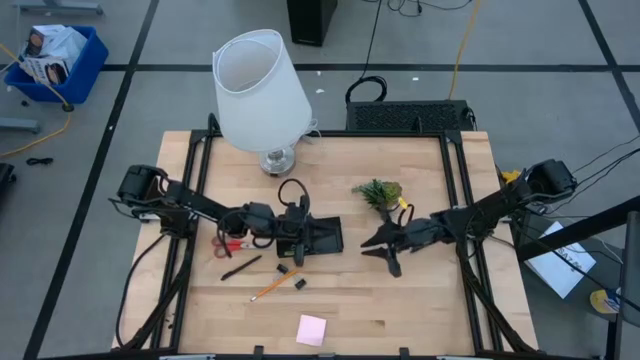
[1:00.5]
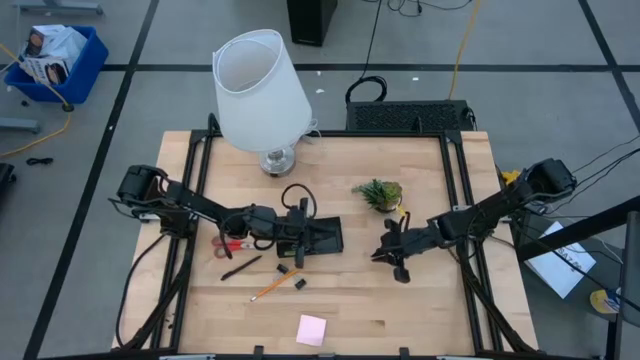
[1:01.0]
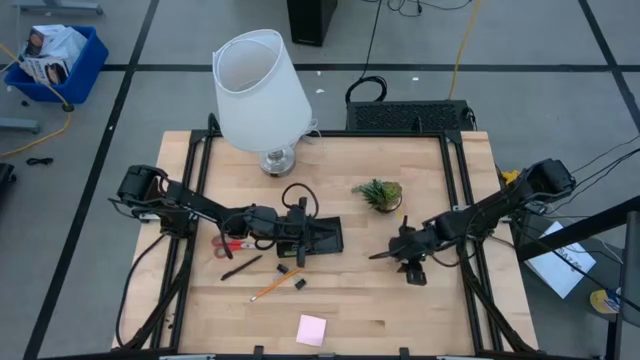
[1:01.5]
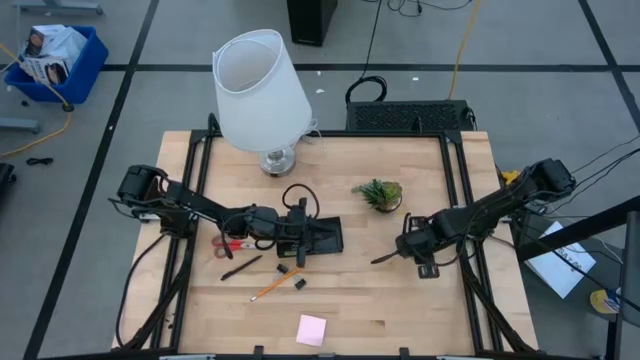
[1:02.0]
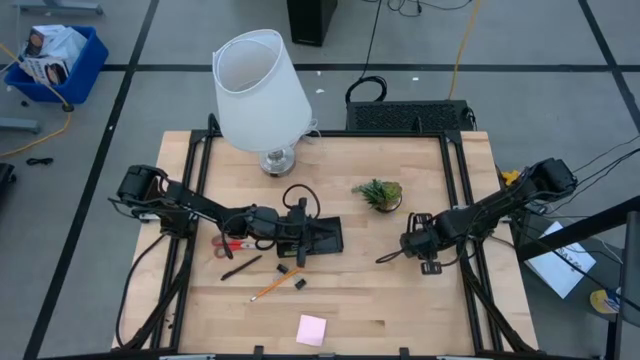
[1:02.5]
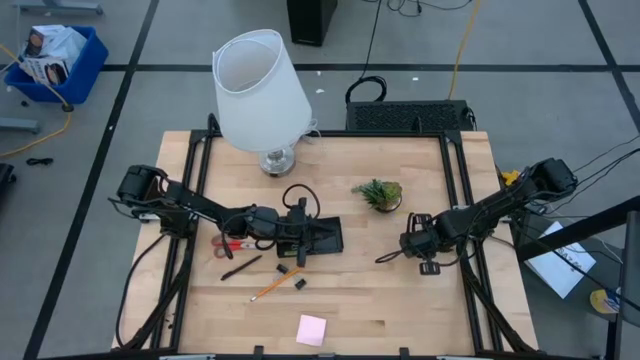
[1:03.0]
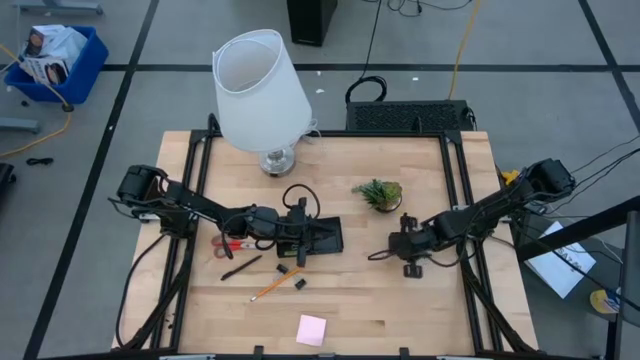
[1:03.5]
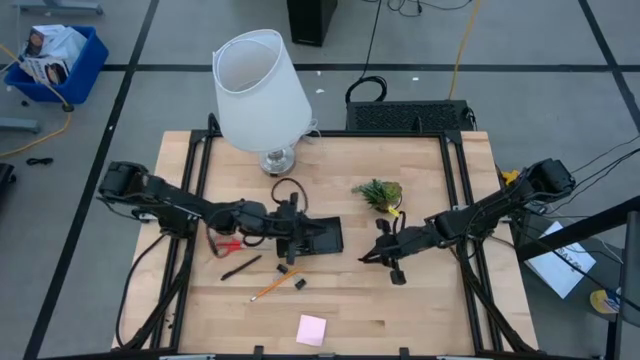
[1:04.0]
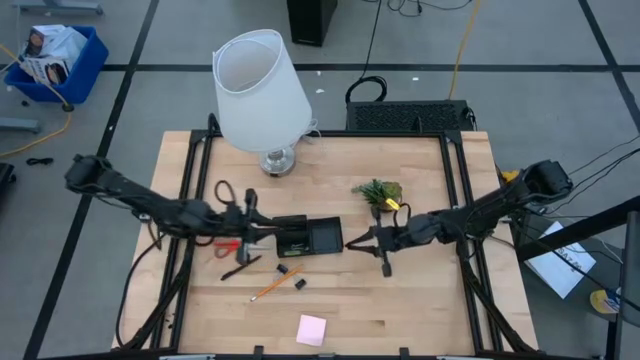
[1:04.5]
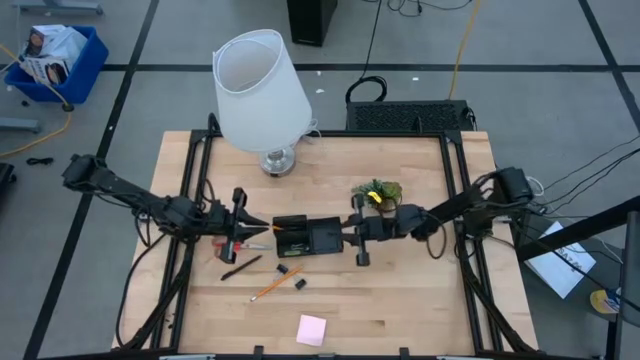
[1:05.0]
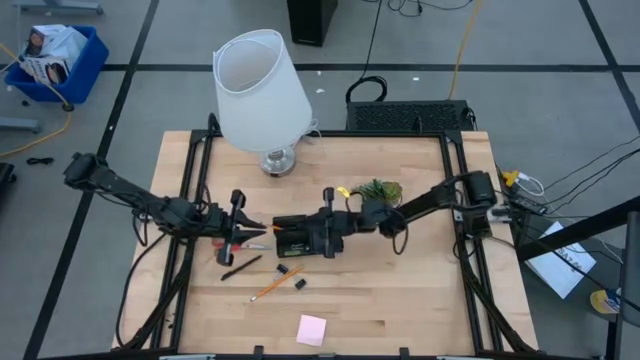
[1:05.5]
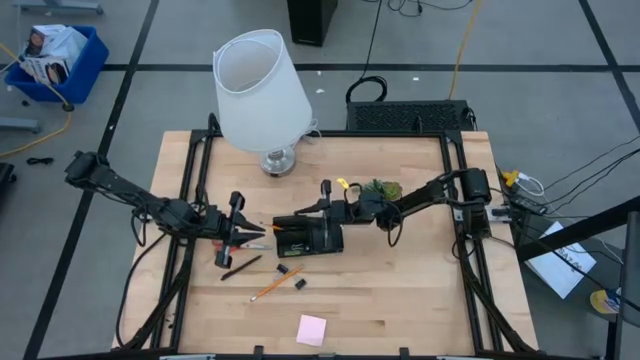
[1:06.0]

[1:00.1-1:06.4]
Task: Pick and place office supplies into organizer
Put the right black pen into the black desk organizer

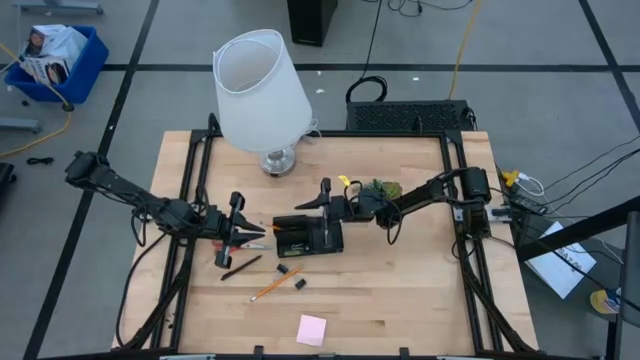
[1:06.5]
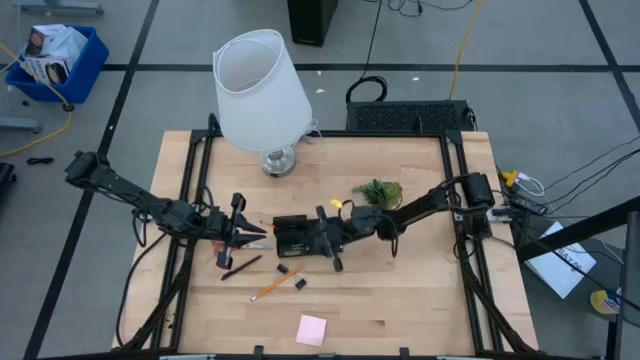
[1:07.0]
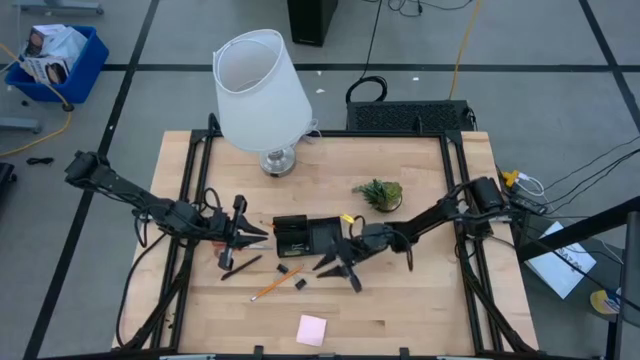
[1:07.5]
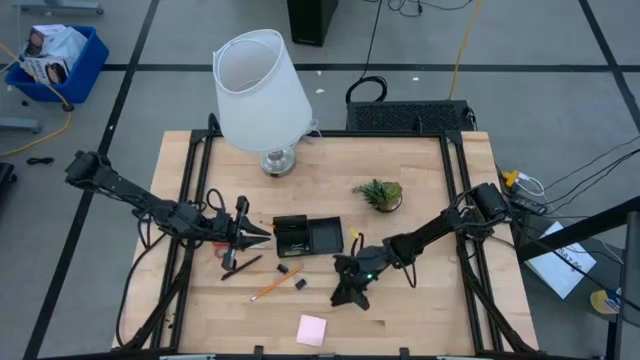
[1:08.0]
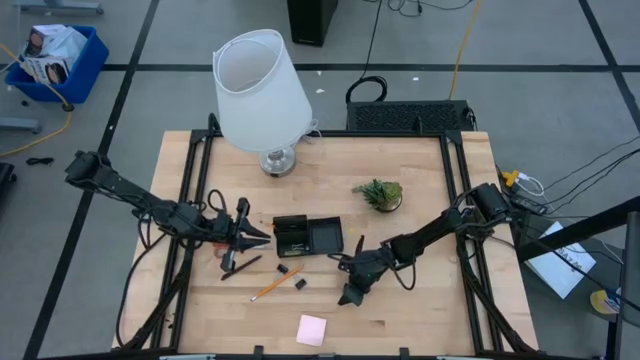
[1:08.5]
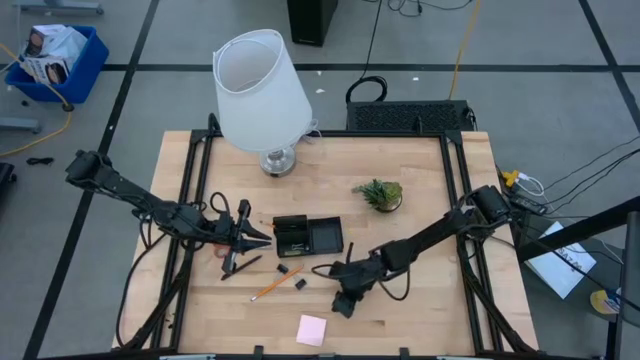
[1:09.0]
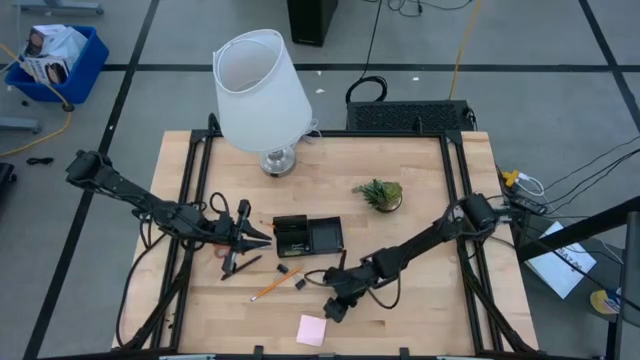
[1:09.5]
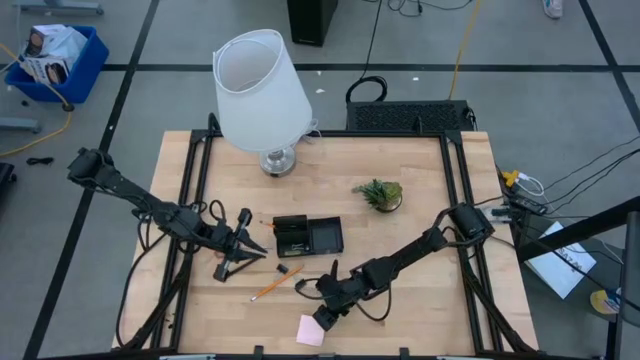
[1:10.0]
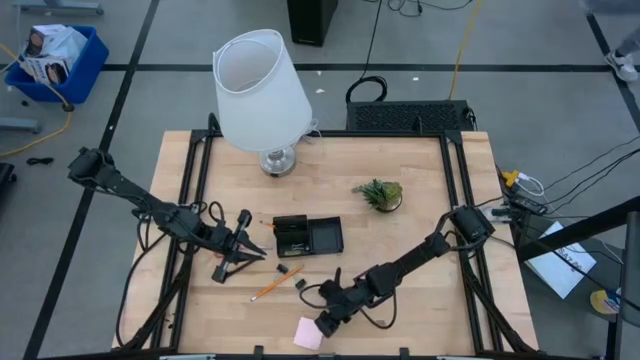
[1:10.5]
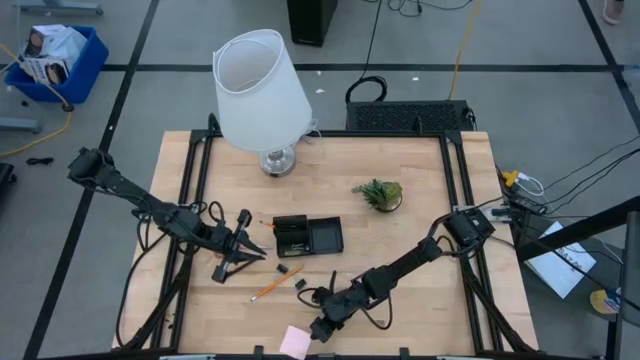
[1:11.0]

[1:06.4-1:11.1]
Put the pink sticky note into the black desk organizer

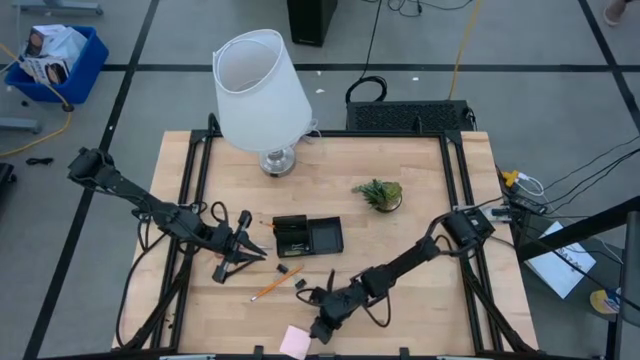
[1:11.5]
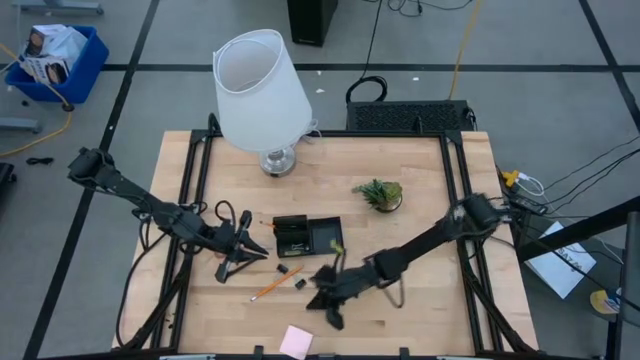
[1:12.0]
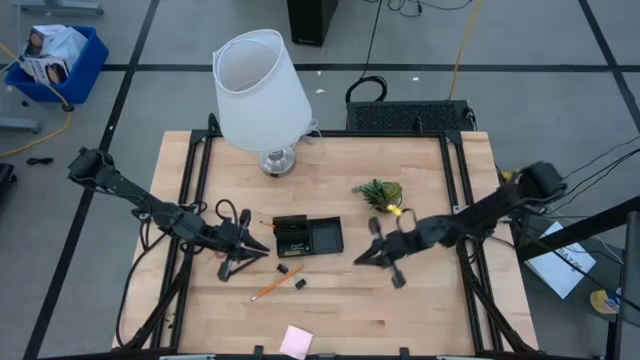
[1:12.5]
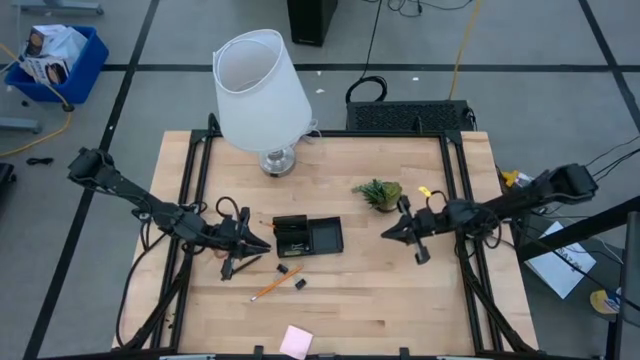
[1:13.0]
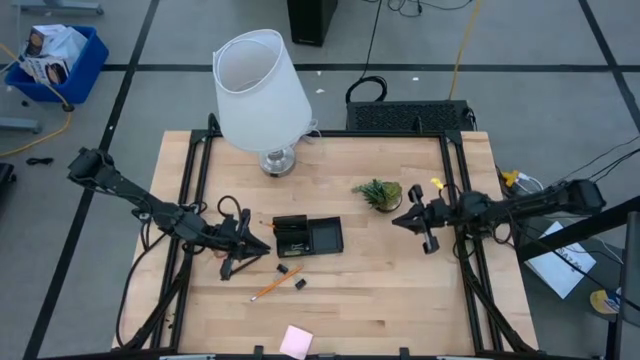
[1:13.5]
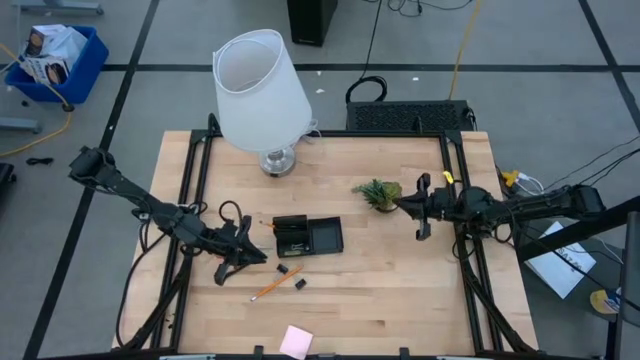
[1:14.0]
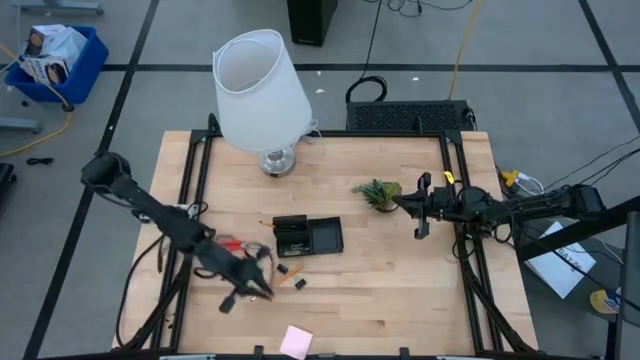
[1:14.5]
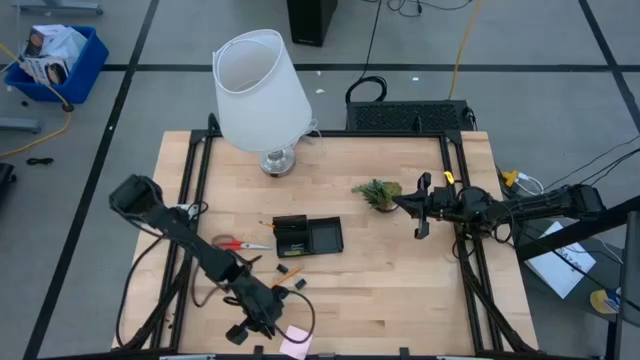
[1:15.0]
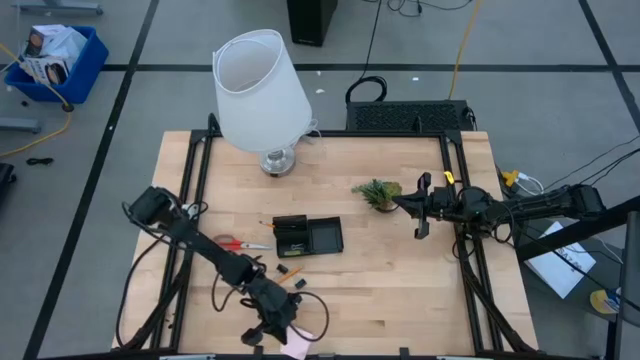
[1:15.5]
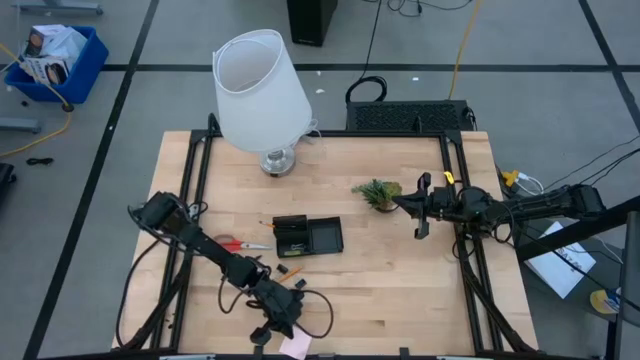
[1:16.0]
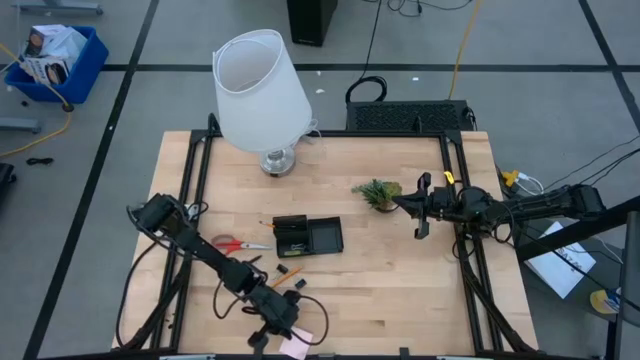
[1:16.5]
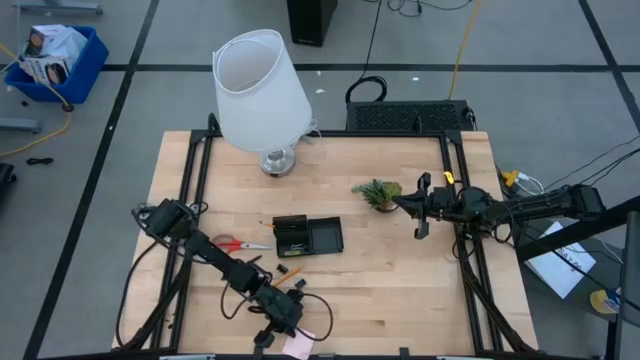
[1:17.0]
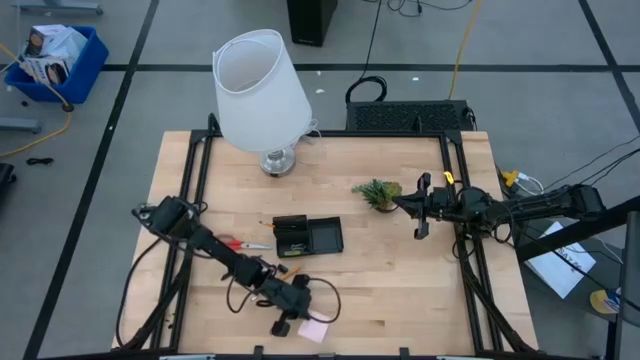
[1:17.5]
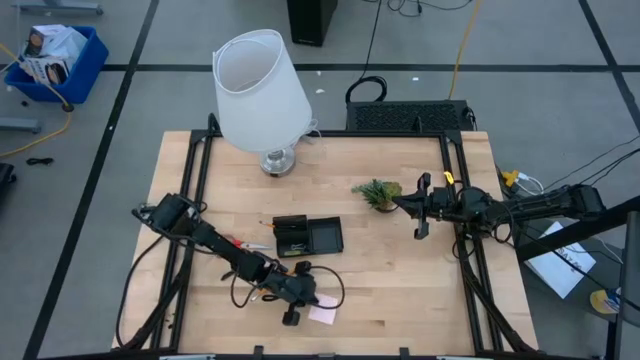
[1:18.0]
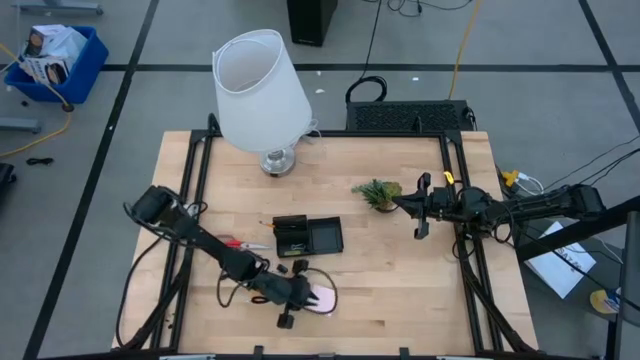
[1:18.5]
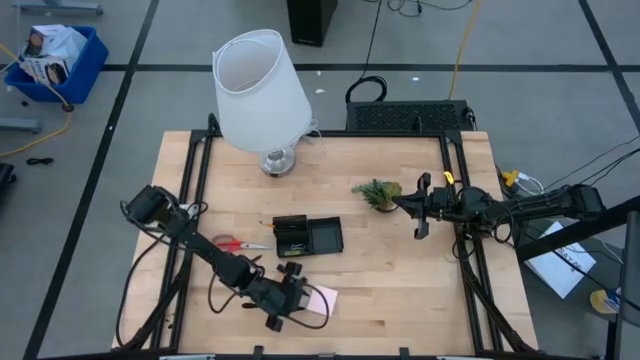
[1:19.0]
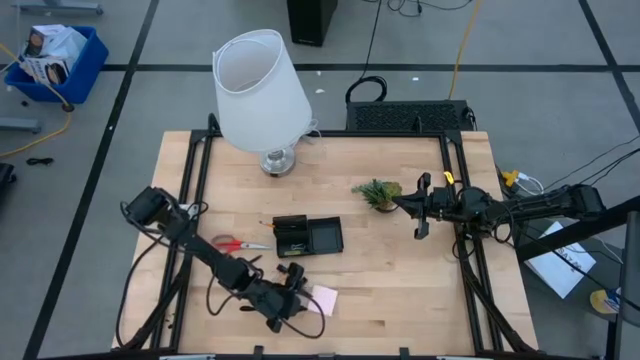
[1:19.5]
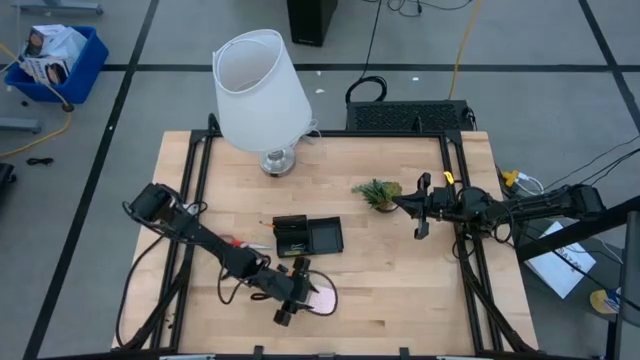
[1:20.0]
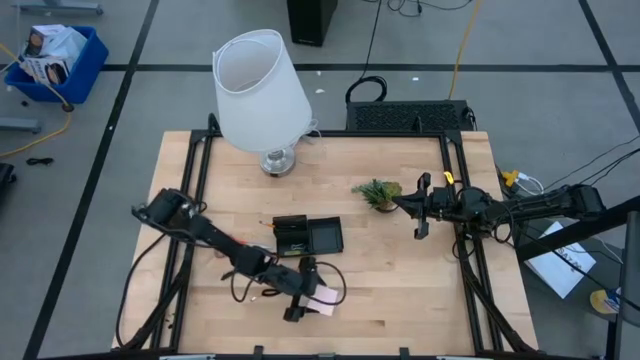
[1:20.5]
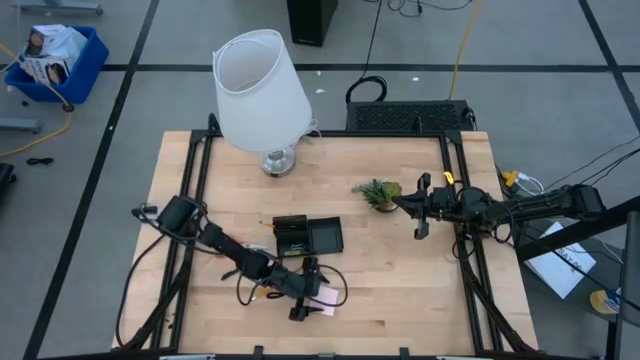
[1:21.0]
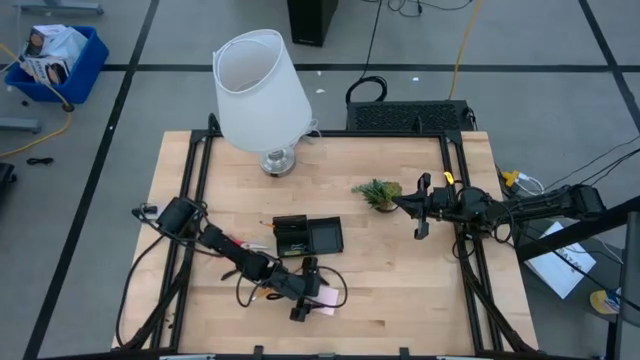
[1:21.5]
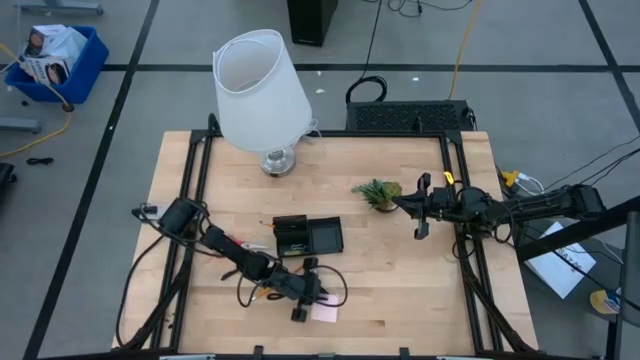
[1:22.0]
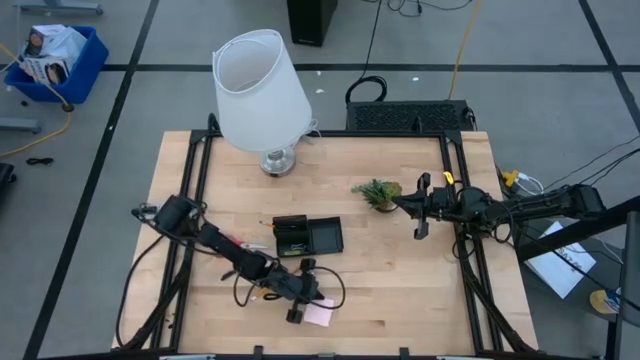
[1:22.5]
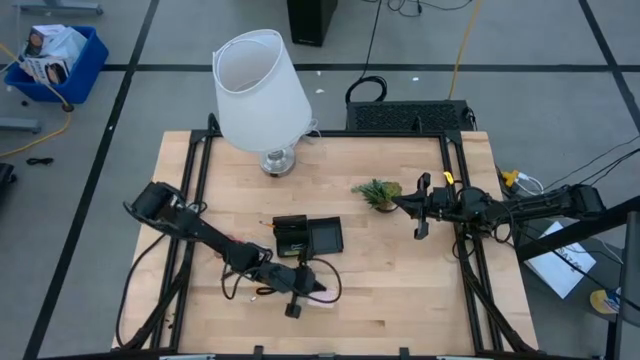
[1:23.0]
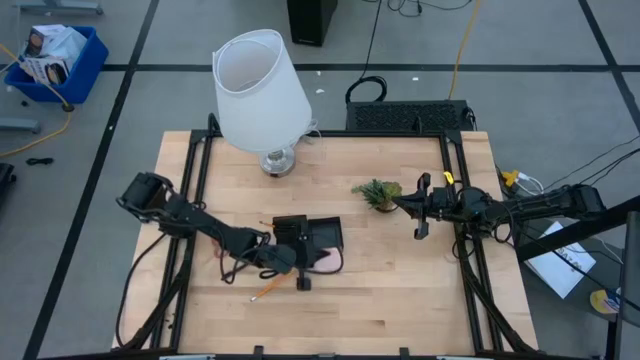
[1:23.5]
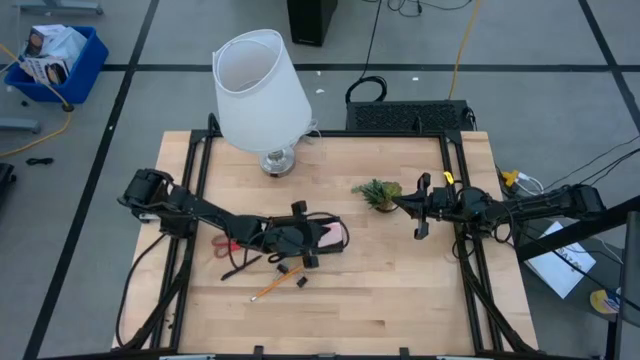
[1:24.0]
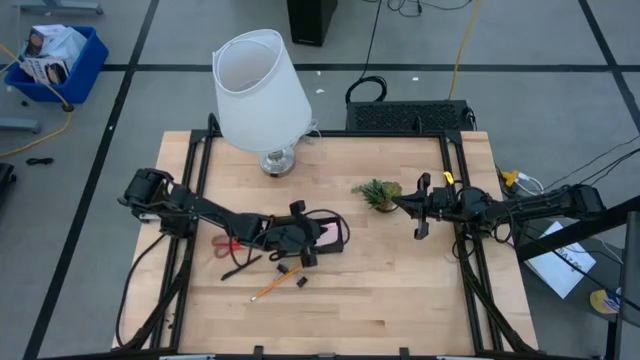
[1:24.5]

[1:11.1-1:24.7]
Put the pink sticky note into the black desk organizer
